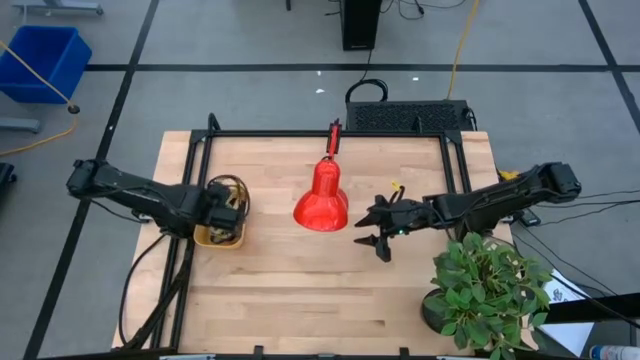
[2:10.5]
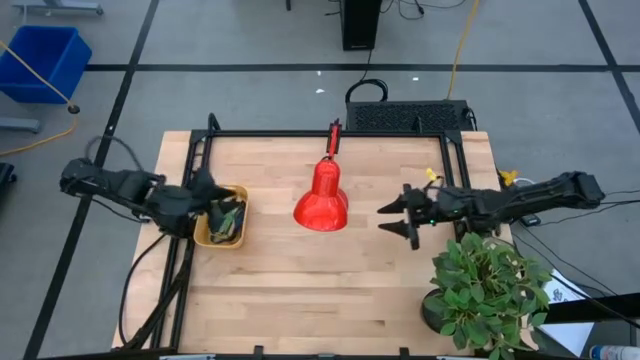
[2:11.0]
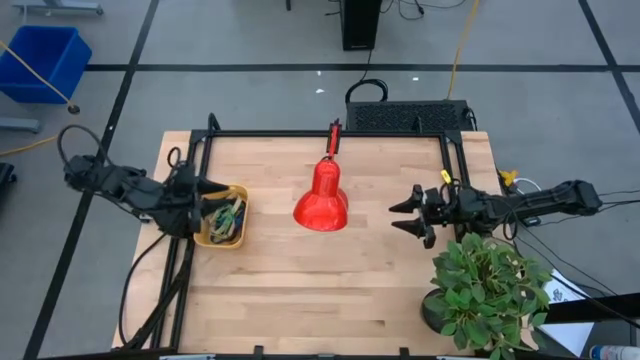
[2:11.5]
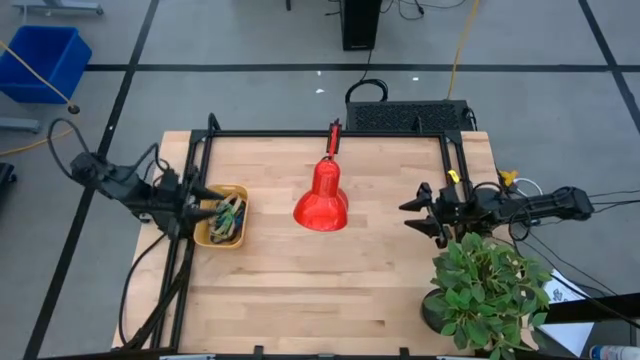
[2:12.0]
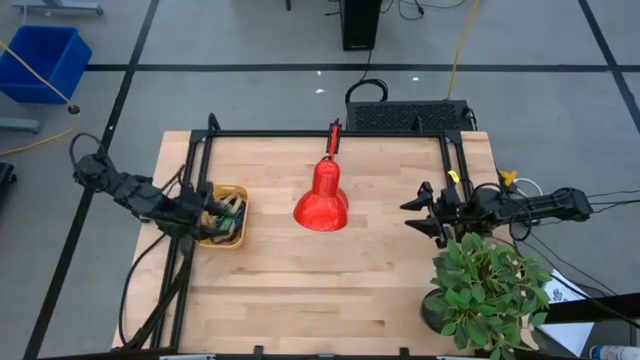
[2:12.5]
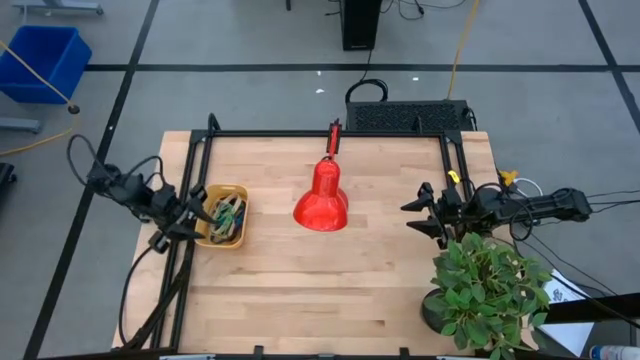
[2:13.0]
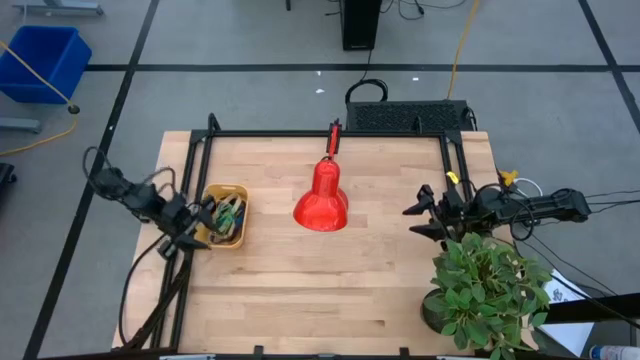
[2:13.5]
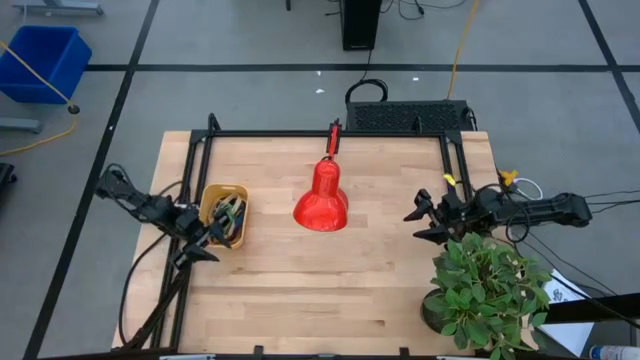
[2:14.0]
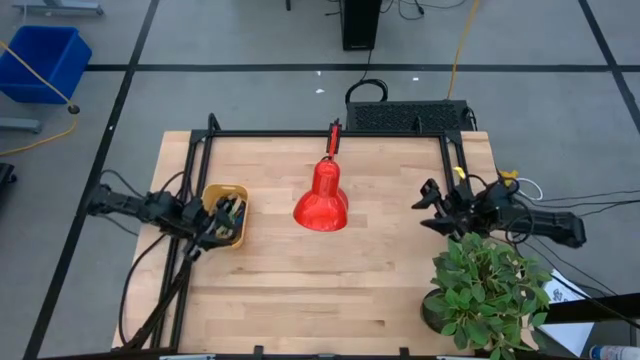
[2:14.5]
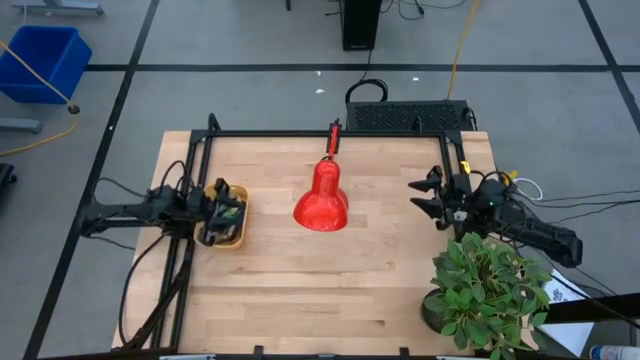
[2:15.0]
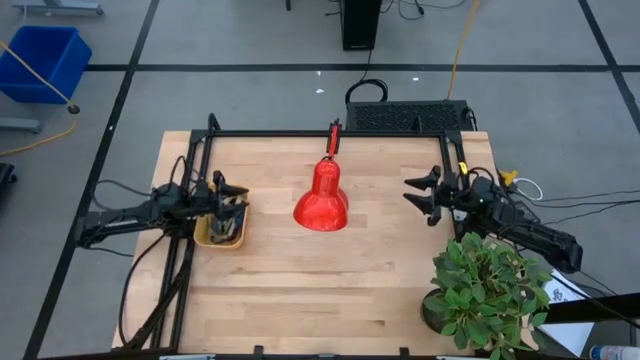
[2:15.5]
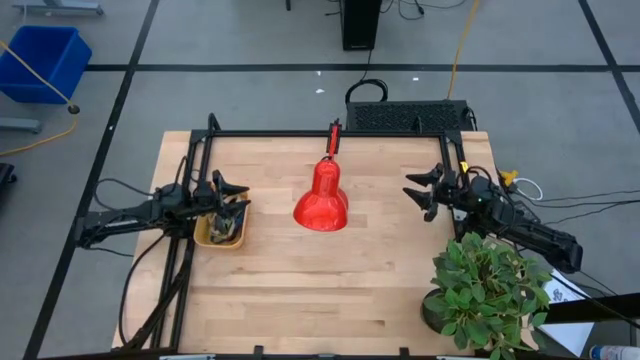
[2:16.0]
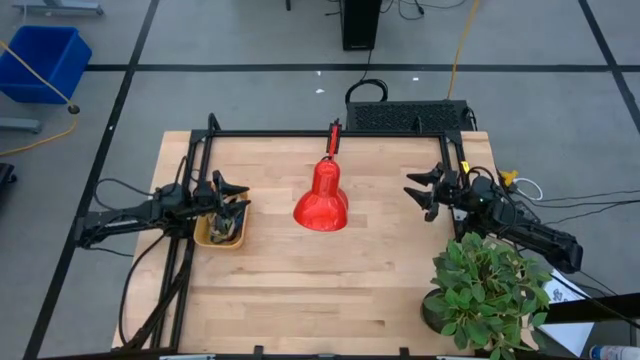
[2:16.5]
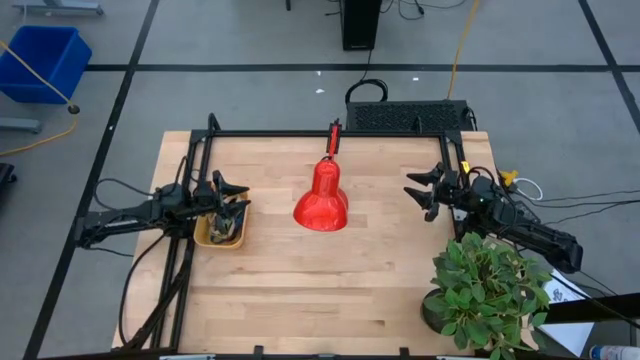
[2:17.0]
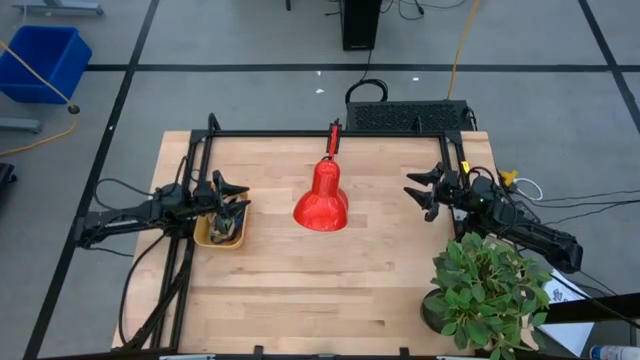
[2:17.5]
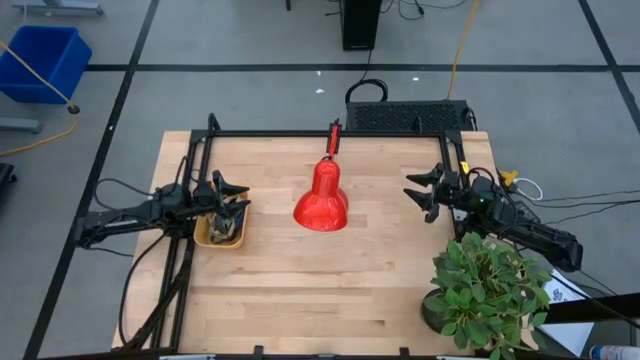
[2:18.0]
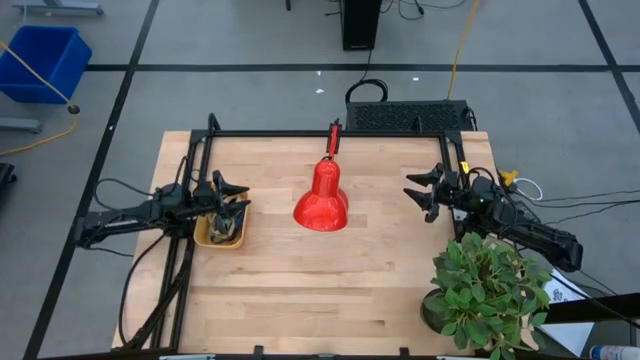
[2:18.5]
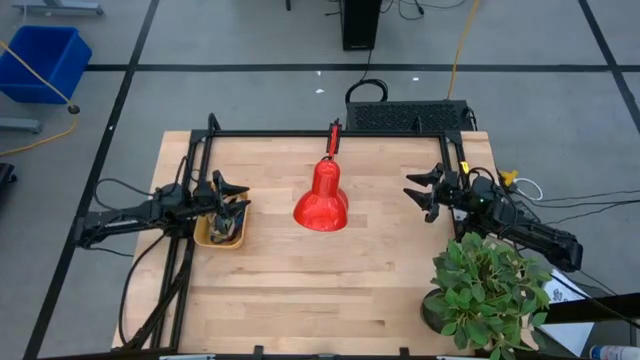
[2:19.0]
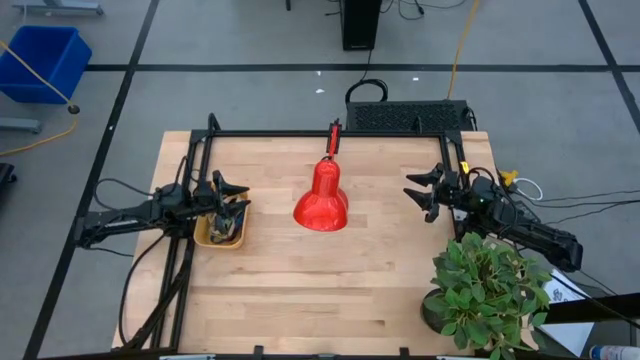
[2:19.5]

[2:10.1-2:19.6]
Task: Pick and place rubber bands into bin
Return to Home Position

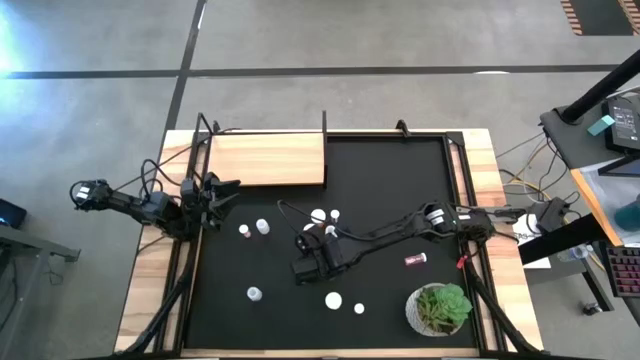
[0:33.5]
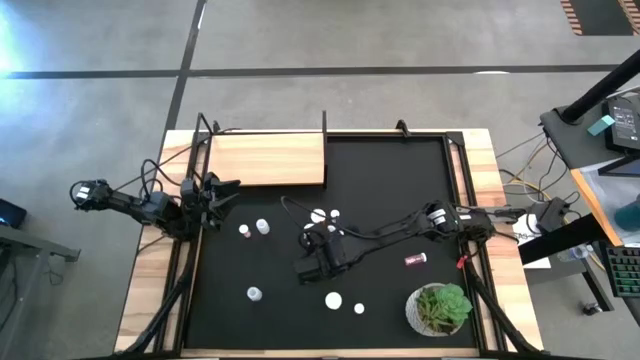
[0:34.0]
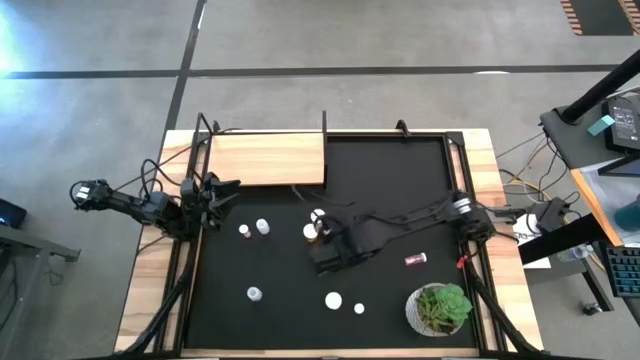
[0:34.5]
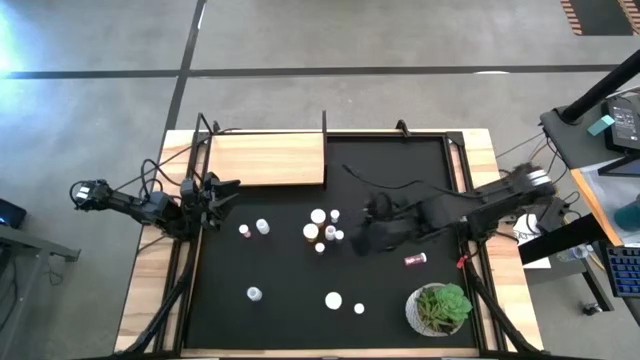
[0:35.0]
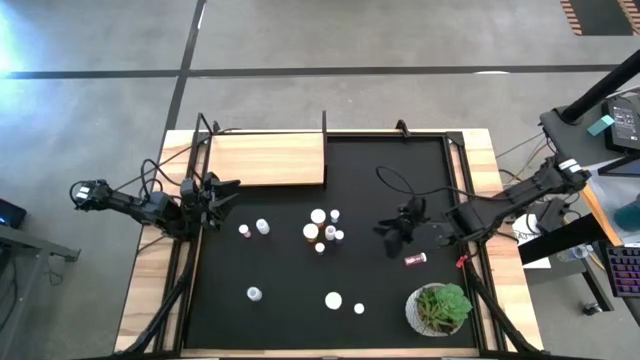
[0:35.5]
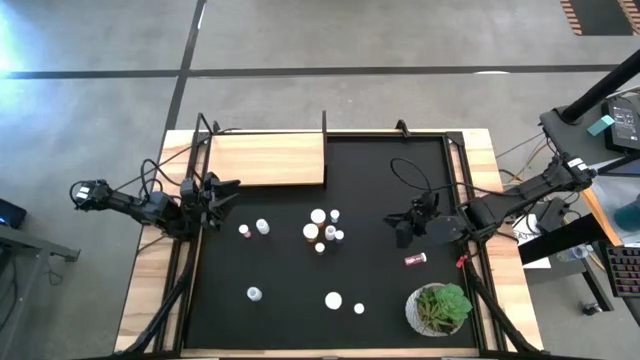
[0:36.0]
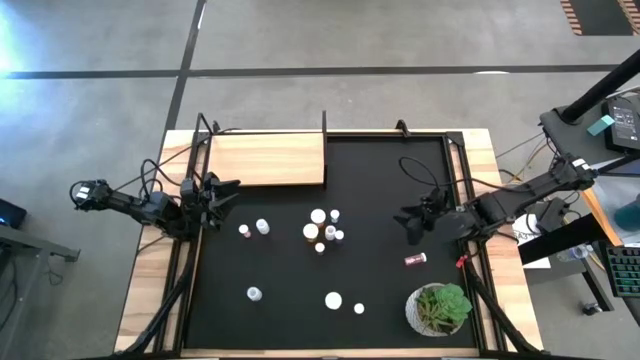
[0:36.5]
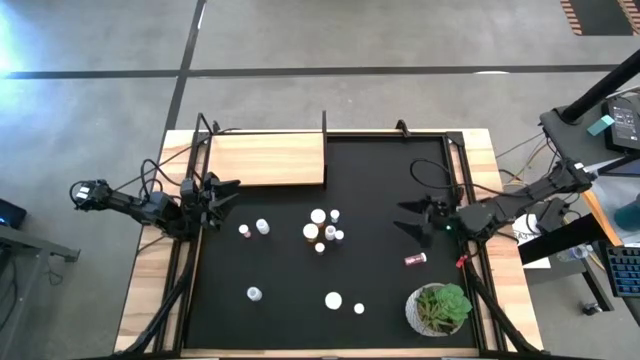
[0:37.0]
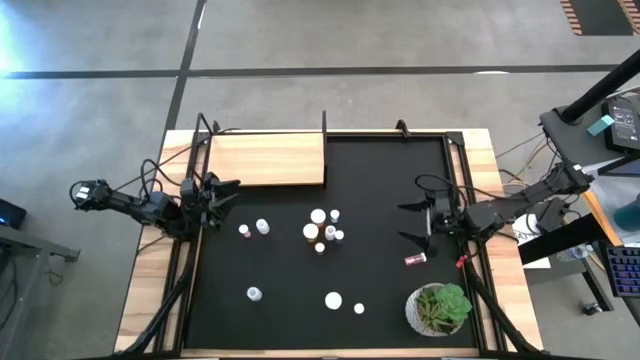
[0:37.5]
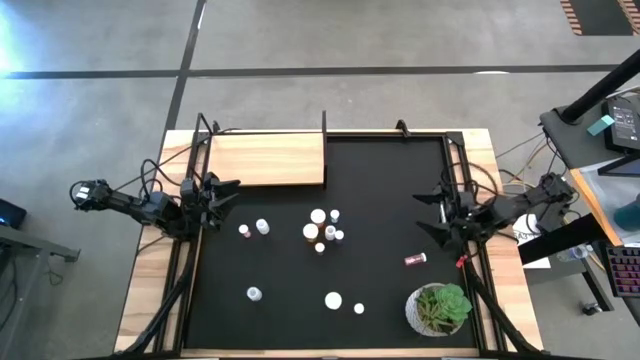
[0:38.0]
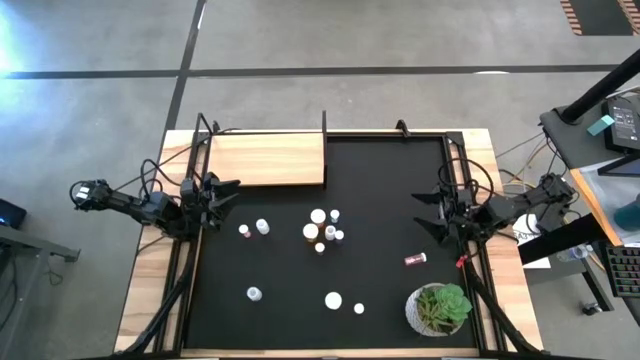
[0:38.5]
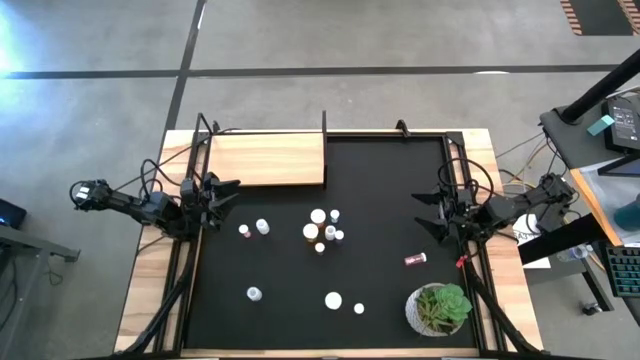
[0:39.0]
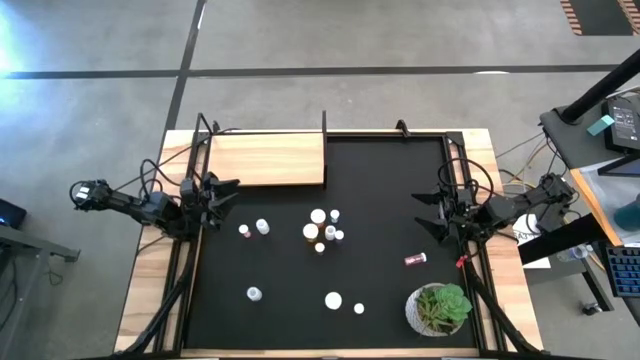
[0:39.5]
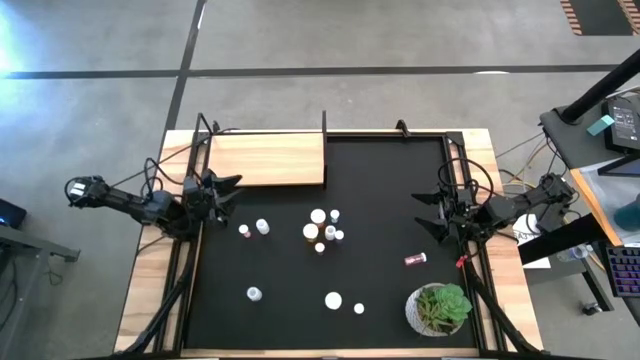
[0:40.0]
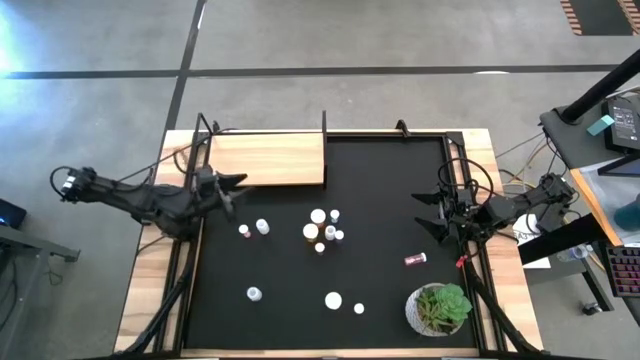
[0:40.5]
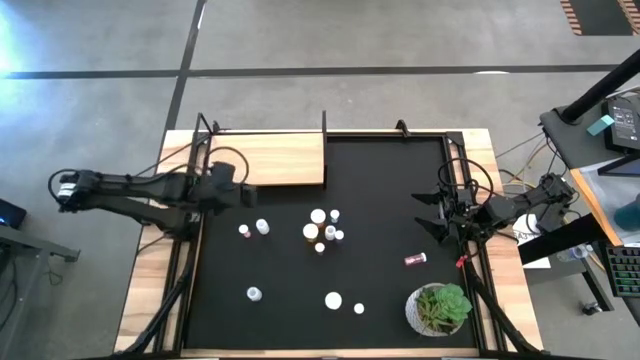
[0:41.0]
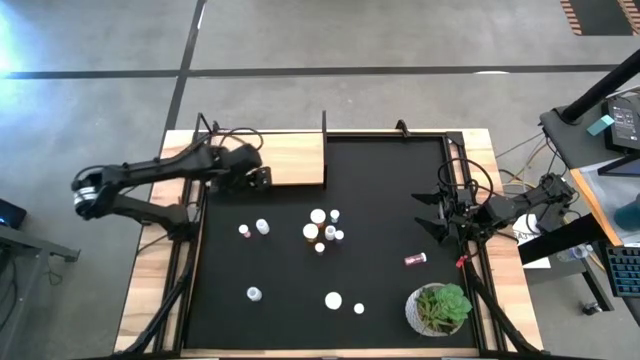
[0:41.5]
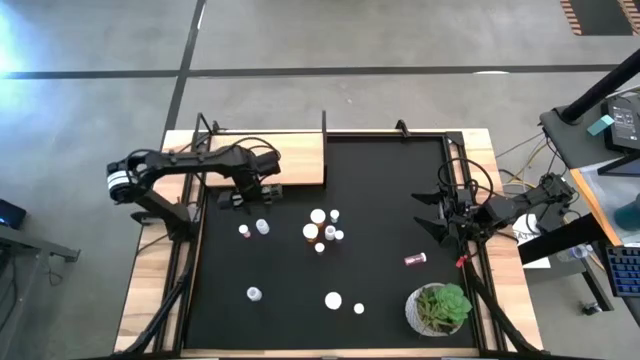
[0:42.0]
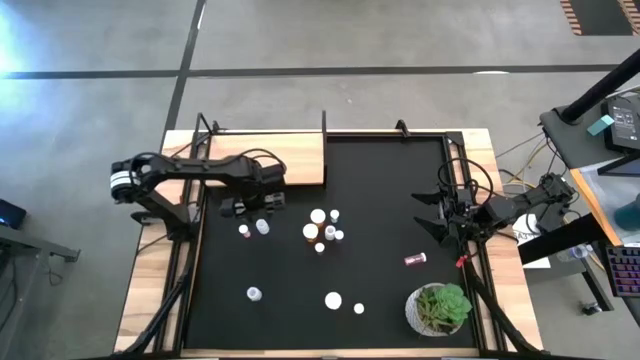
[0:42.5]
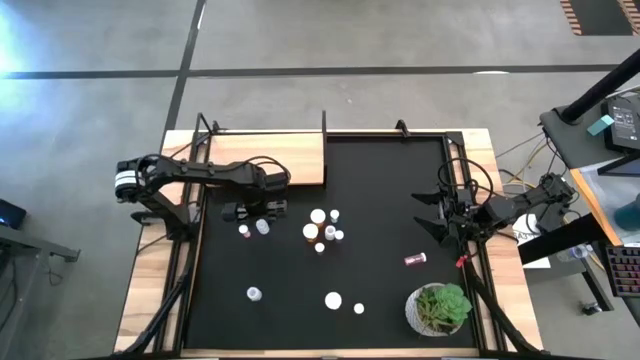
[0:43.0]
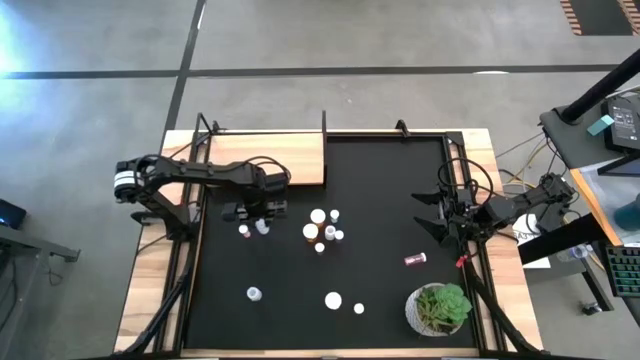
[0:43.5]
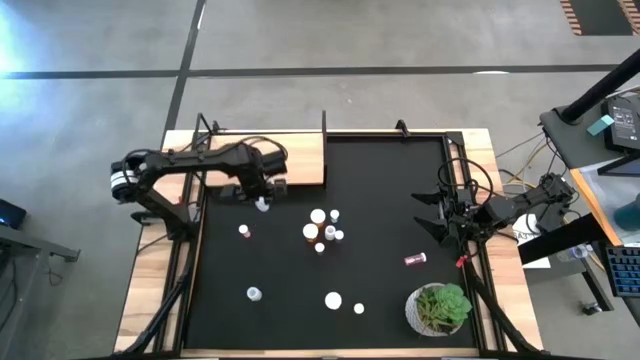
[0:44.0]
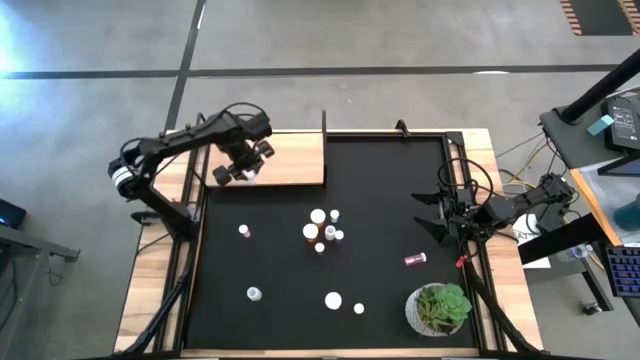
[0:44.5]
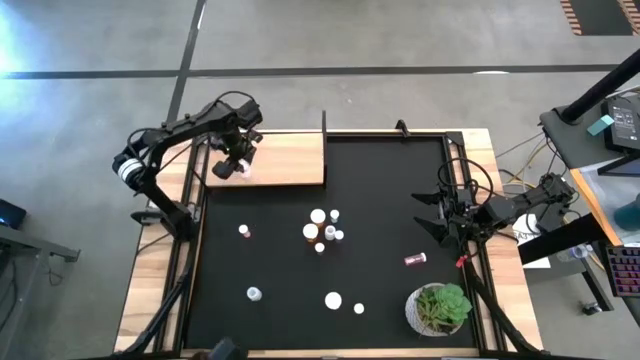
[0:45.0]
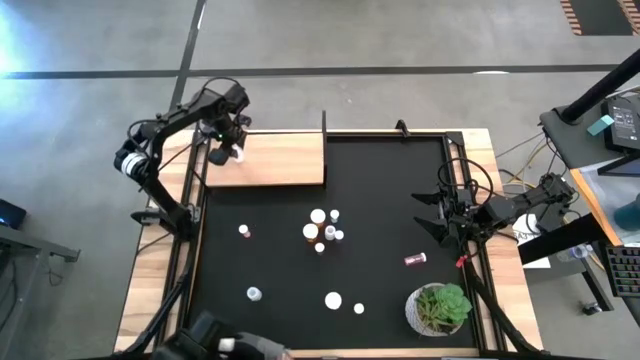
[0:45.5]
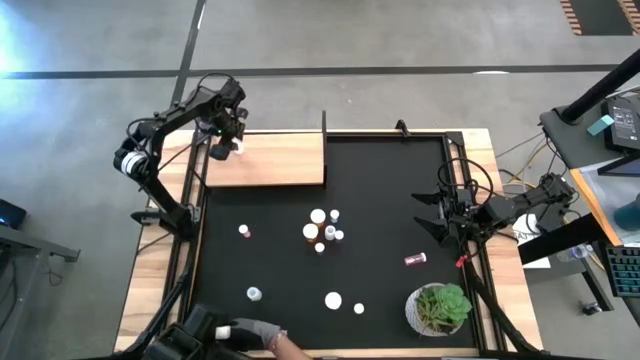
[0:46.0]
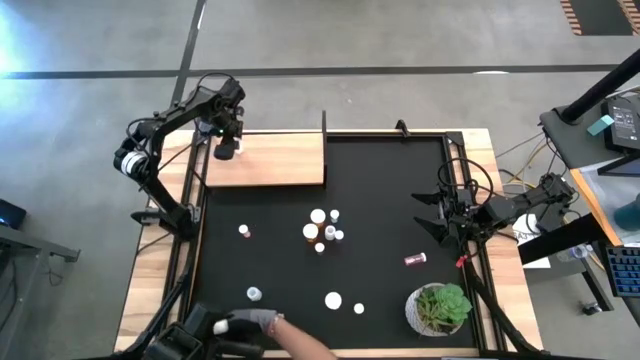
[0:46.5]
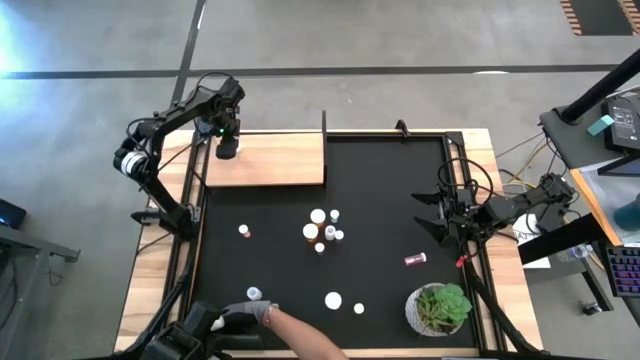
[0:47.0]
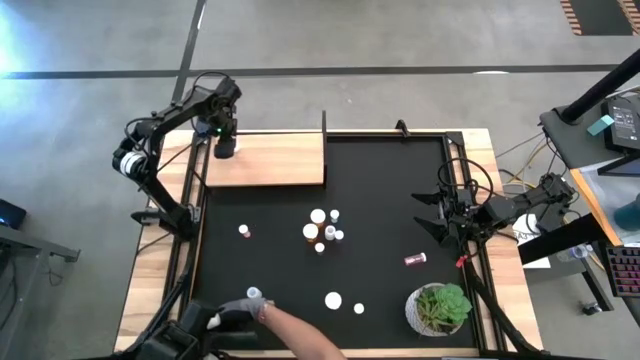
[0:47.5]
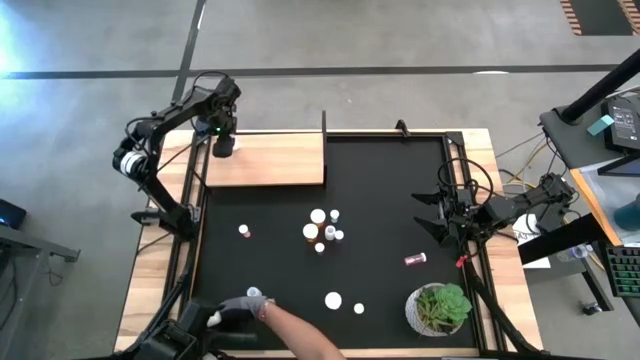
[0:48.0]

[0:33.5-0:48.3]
Task: Pick and place medicine bottles onto shelf by color
Put the top left white pill bottle on the shelf
